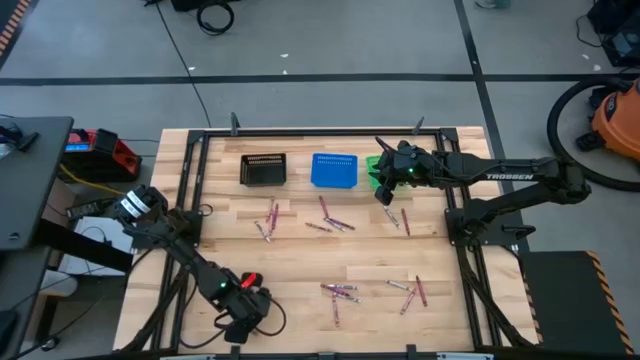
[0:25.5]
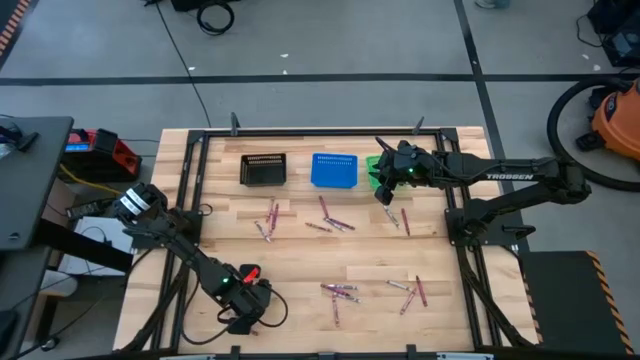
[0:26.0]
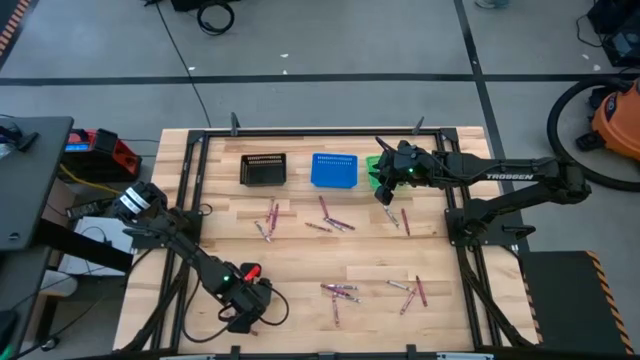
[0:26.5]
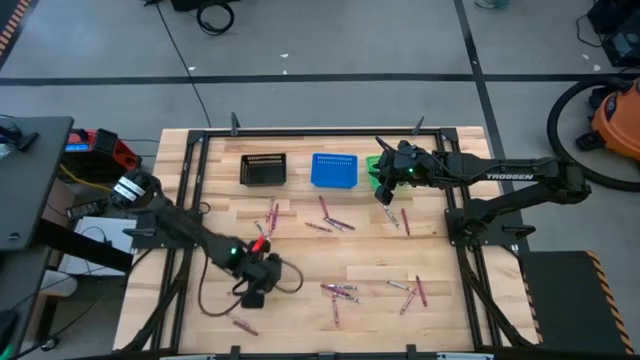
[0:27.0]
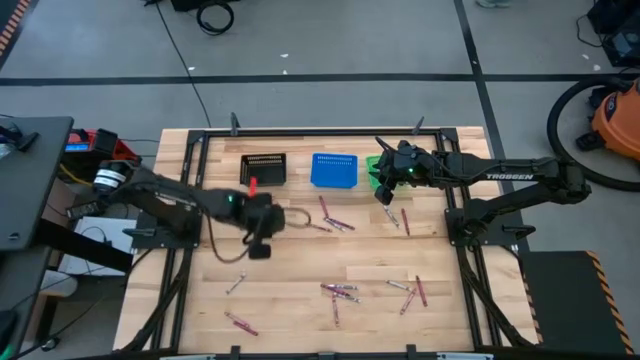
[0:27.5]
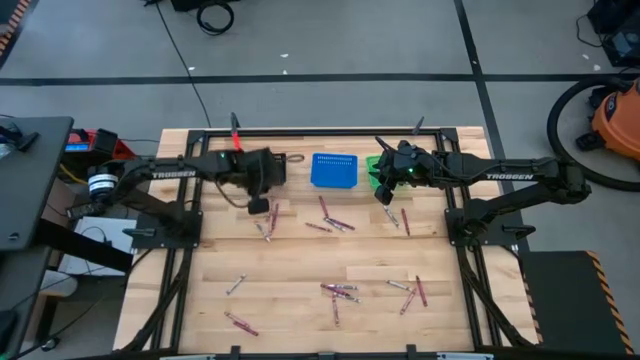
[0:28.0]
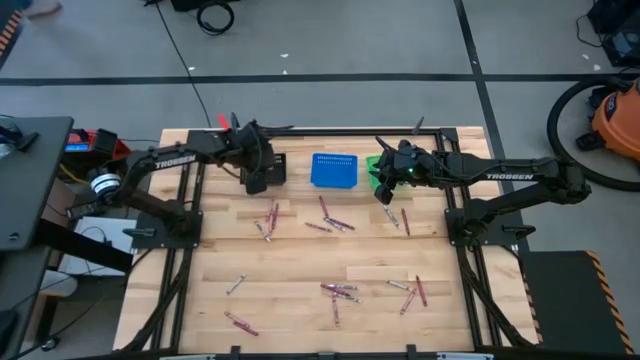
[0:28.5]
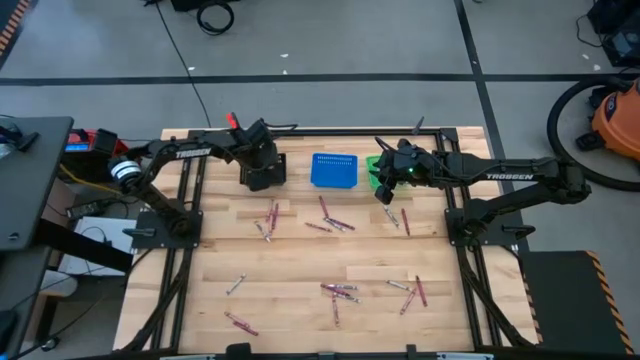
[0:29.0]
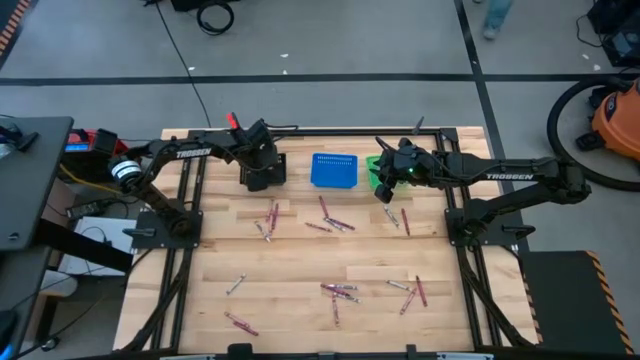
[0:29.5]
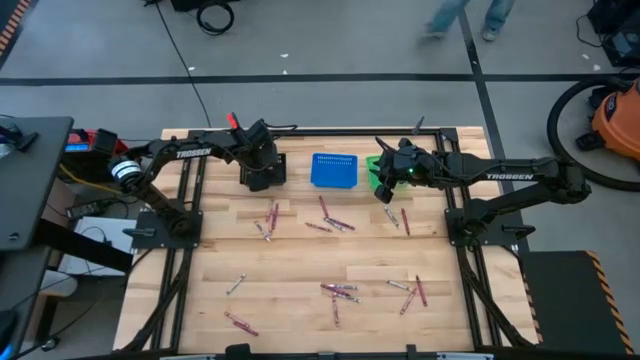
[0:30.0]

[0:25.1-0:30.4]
Task: Sort crayons
Put the pink crayon into the black bin

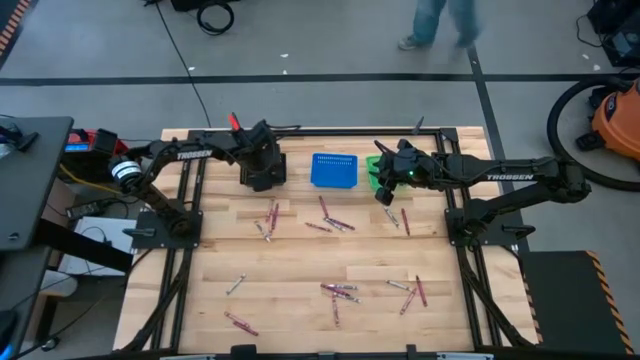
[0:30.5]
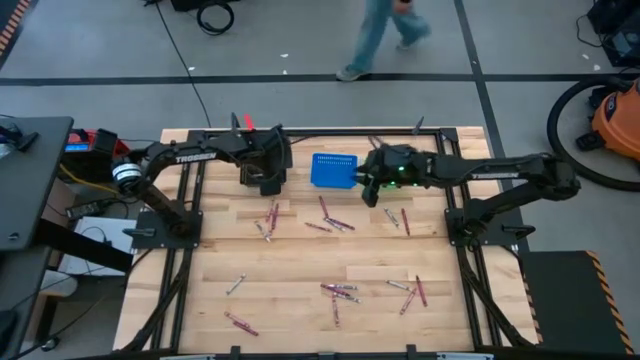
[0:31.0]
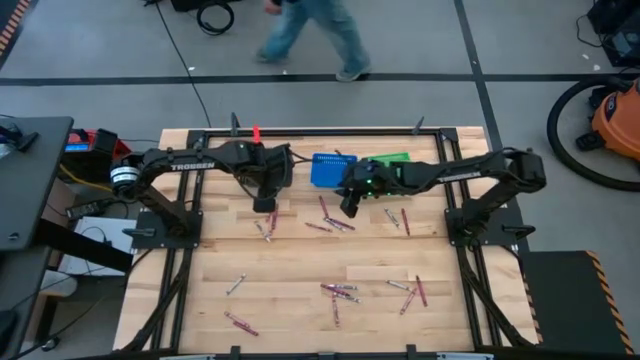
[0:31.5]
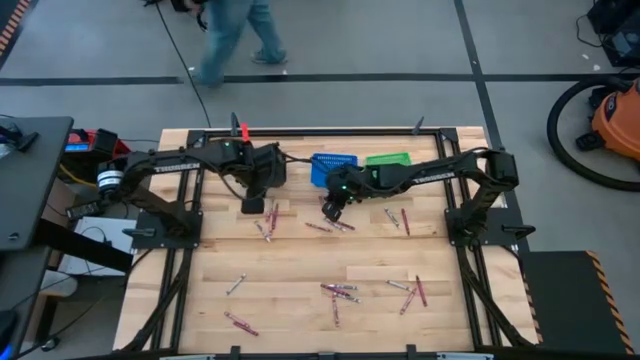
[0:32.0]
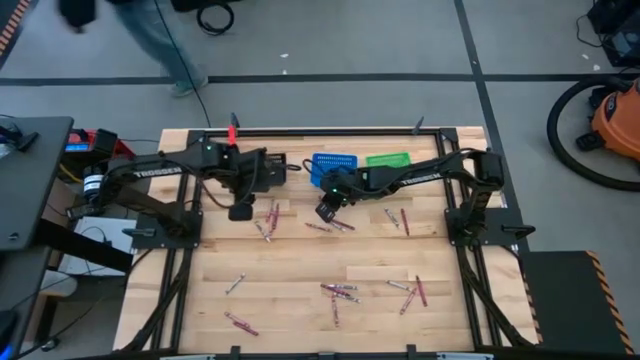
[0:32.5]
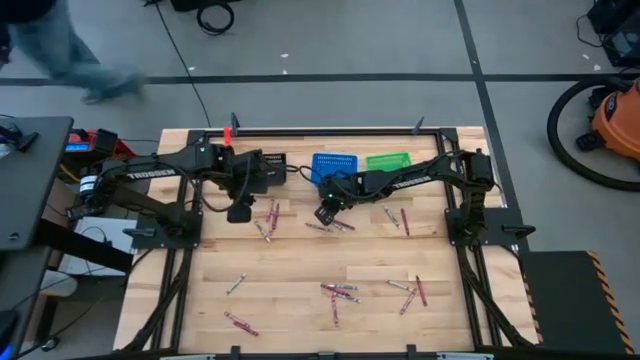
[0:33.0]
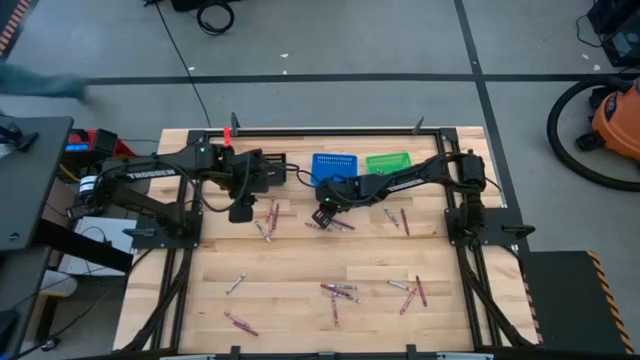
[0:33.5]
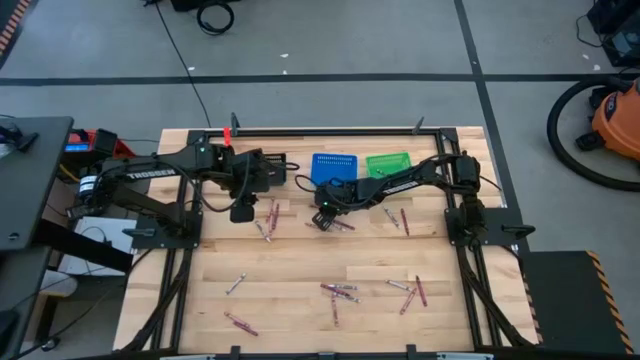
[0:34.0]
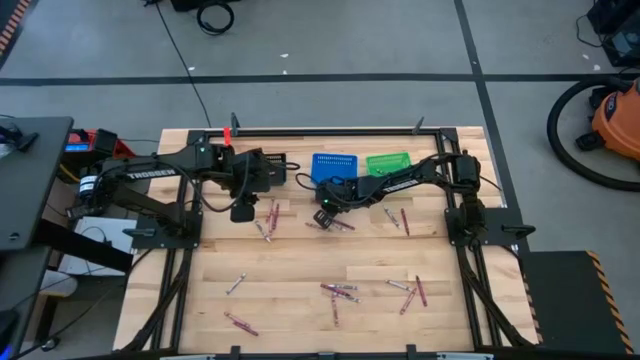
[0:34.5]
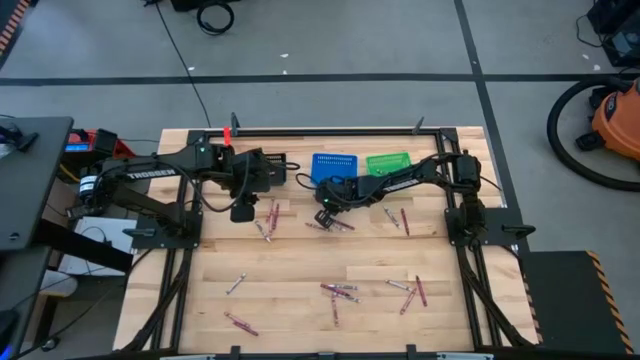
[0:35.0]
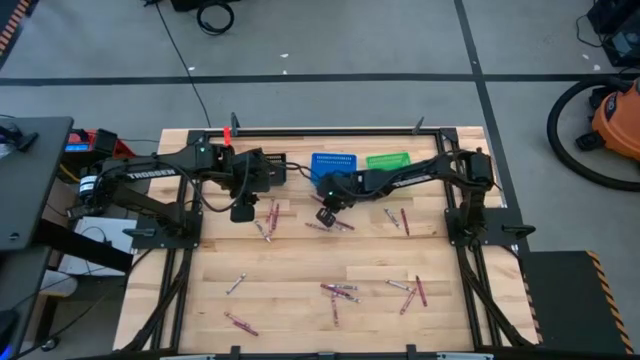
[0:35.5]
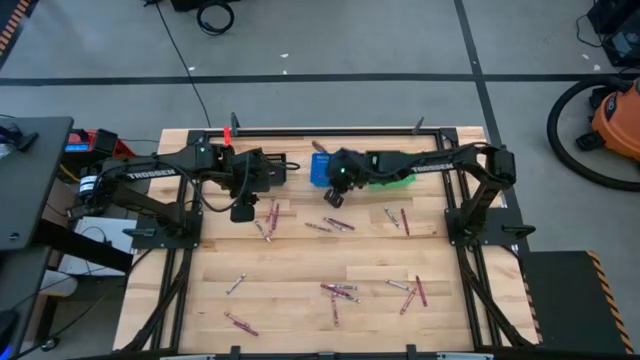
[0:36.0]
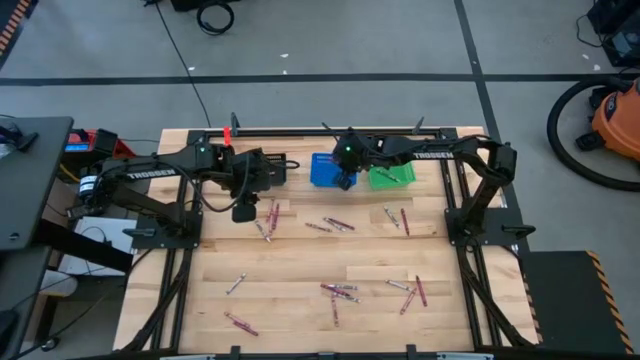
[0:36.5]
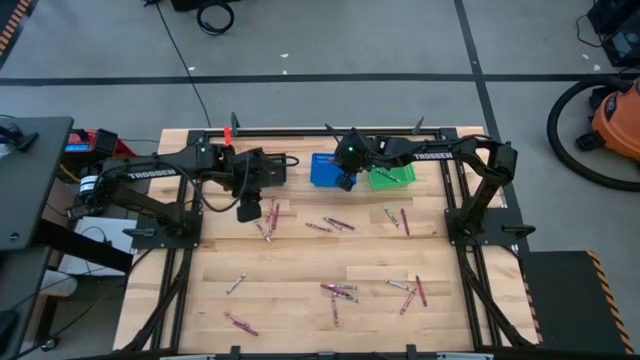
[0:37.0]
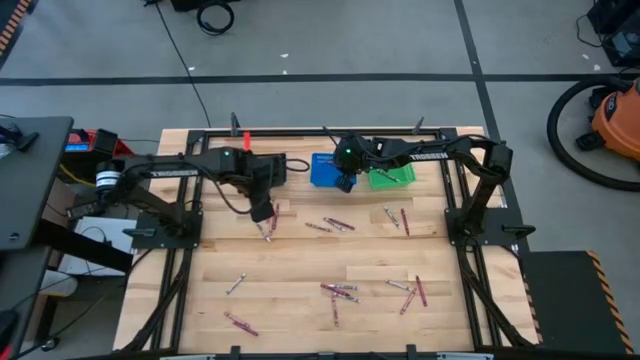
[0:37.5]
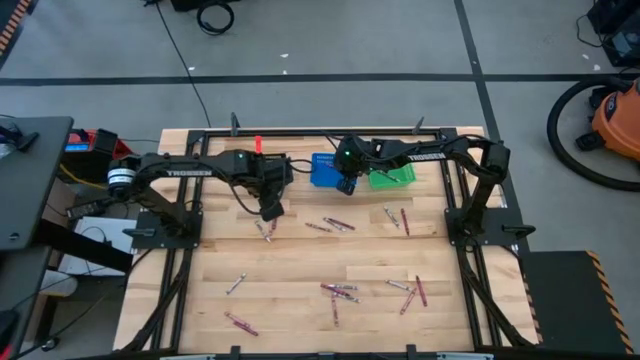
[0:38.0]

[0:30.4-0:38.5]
Put the red crayon into the blue bin

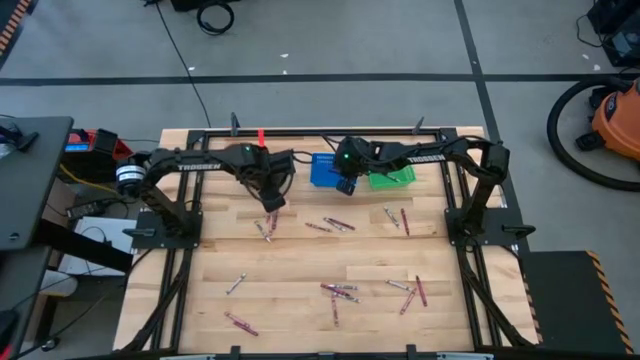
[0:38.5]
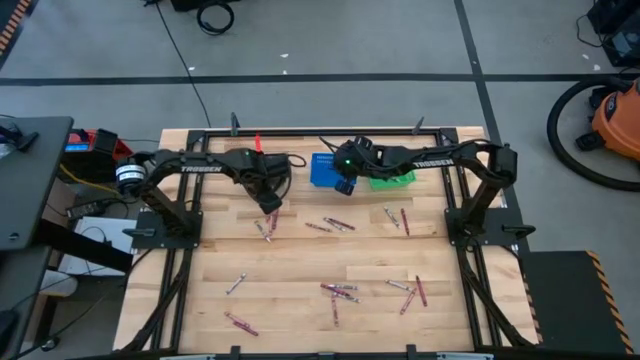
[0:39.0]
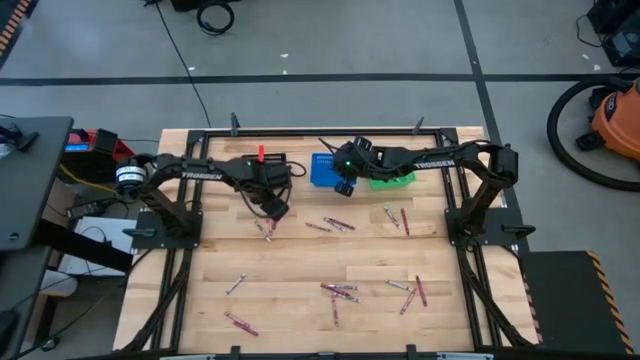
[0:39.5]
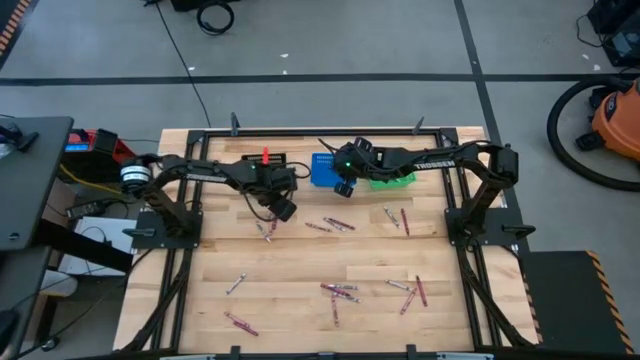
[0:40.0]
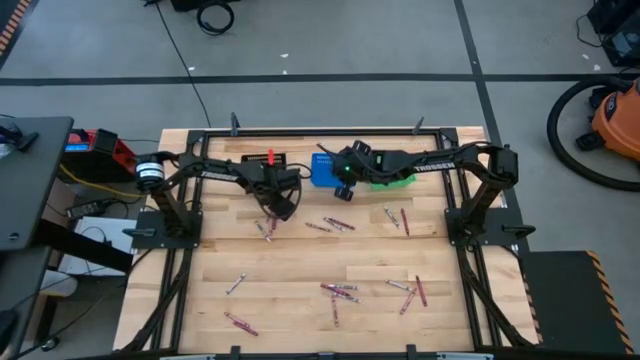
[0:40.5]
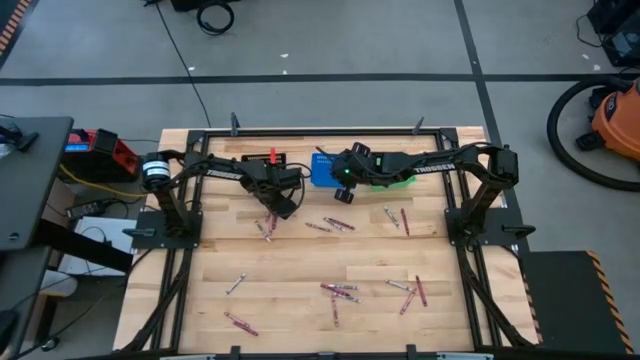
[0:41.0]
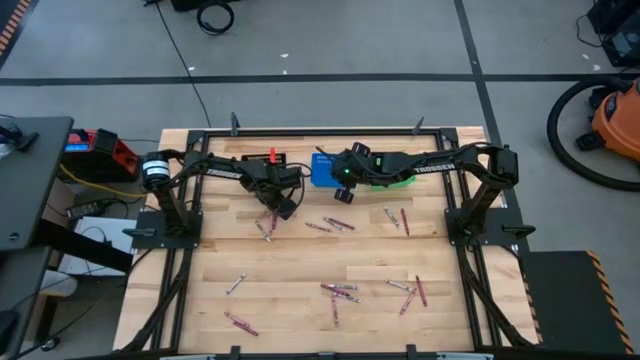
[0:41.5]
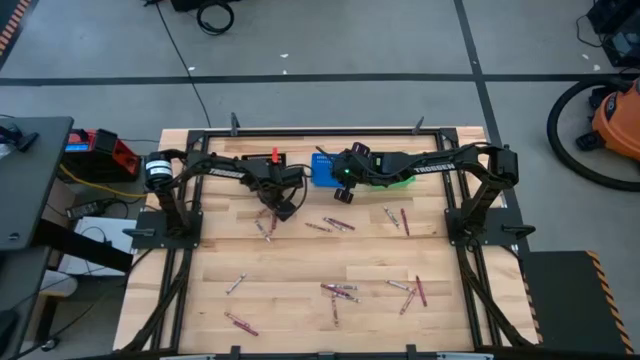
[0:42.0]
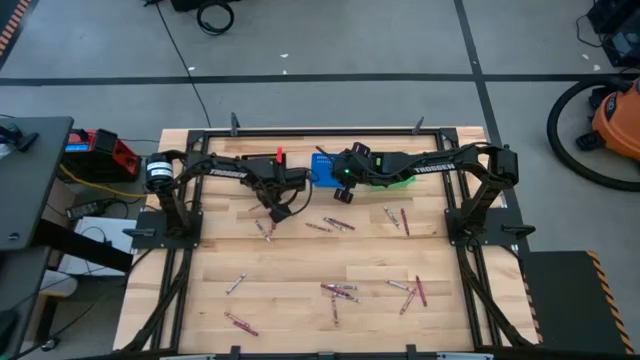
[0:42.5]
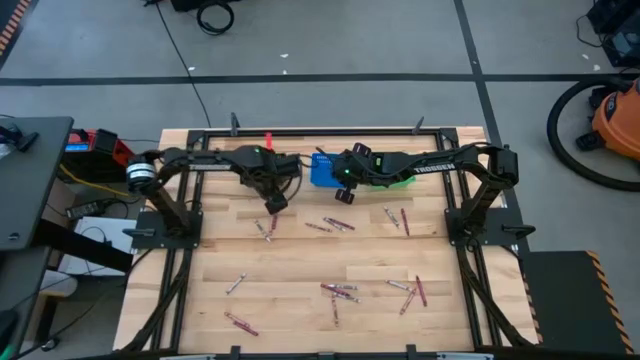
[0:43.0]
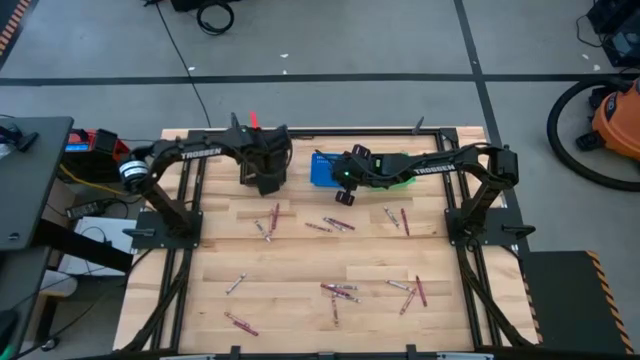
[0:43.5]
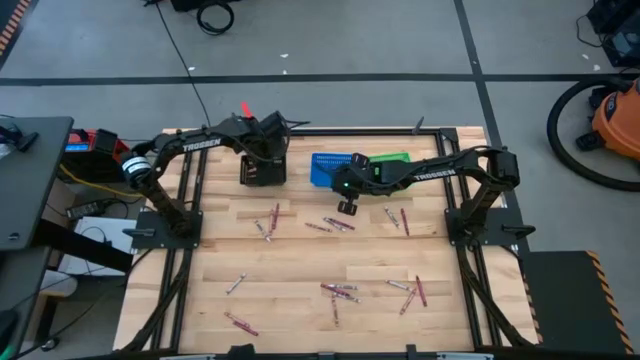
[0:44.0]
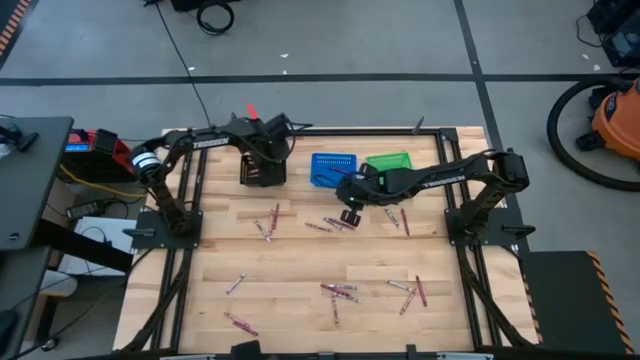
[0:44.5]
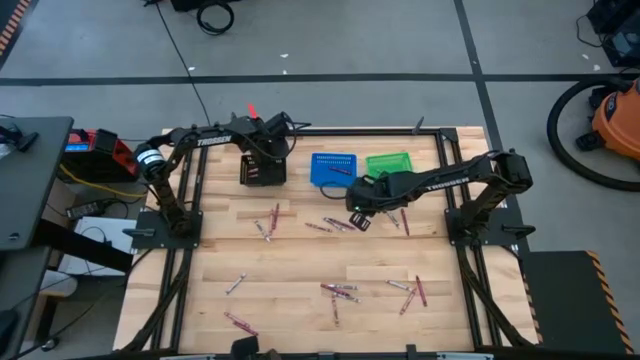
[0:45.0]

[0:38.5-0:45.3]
Put the pink crayon into the black bin
